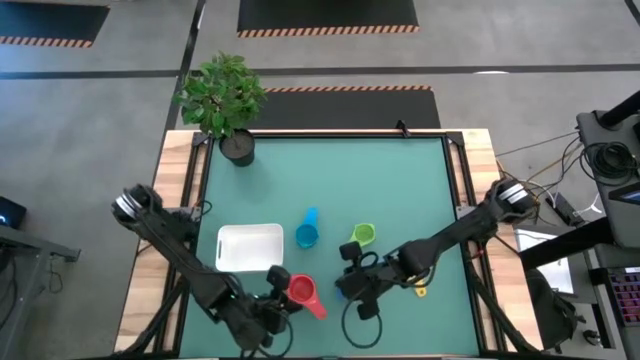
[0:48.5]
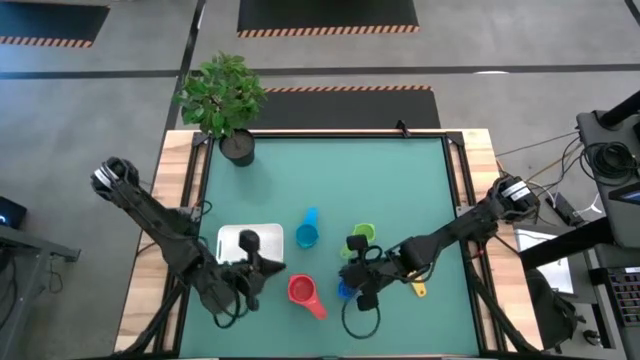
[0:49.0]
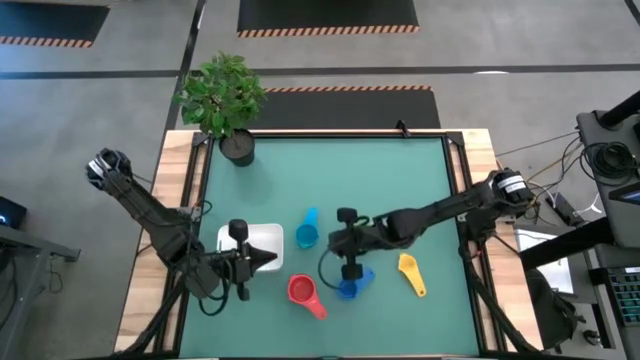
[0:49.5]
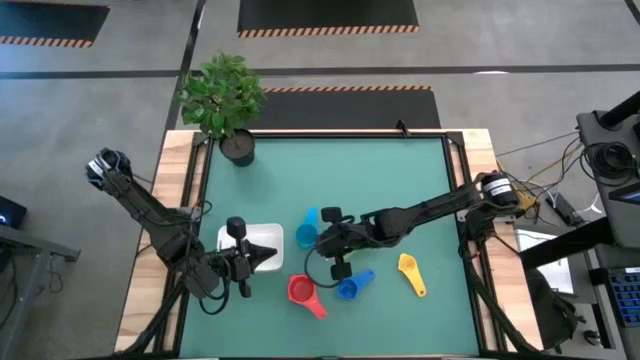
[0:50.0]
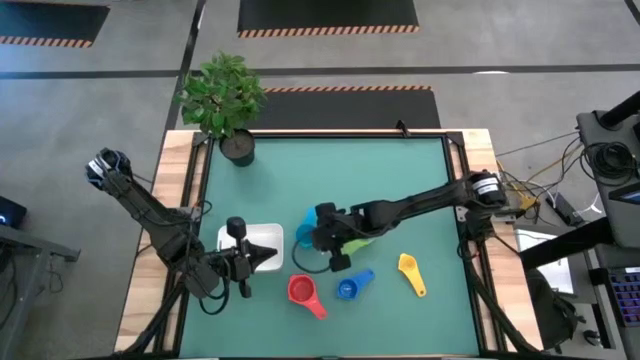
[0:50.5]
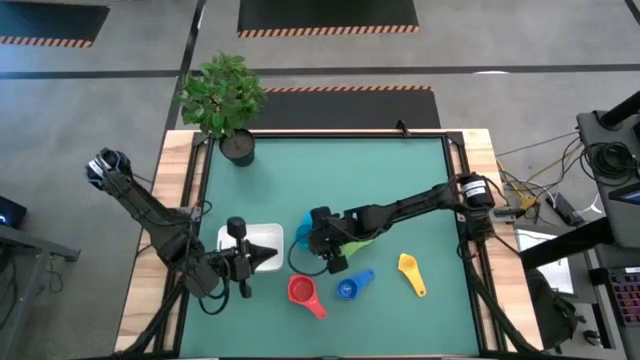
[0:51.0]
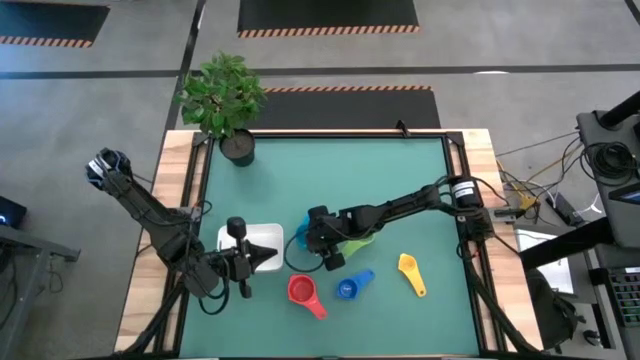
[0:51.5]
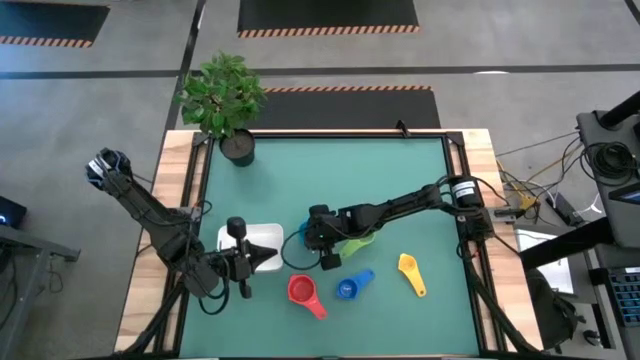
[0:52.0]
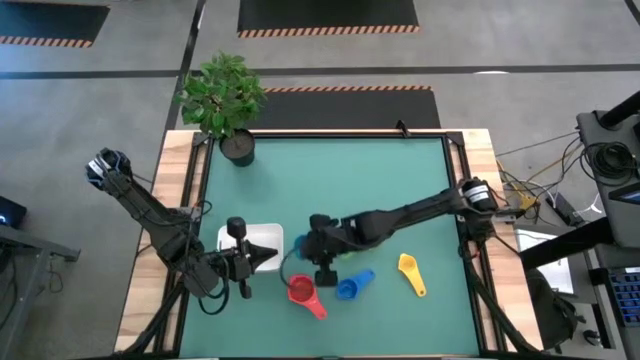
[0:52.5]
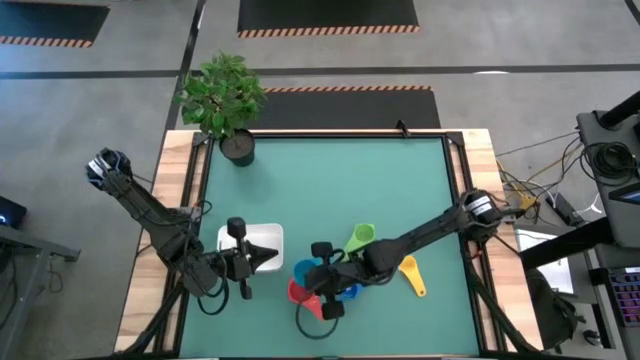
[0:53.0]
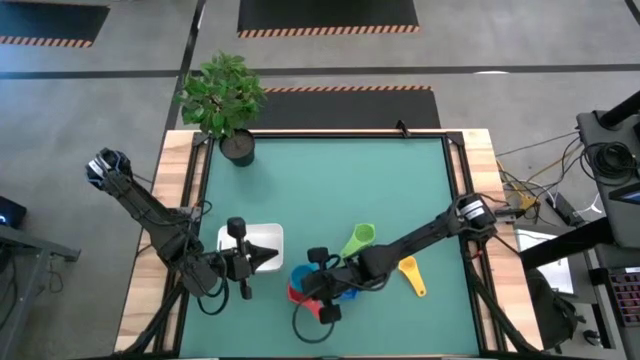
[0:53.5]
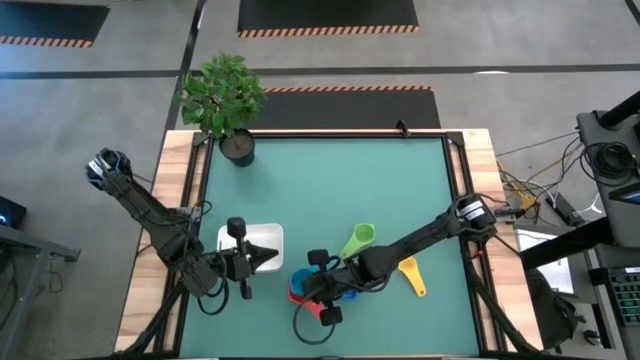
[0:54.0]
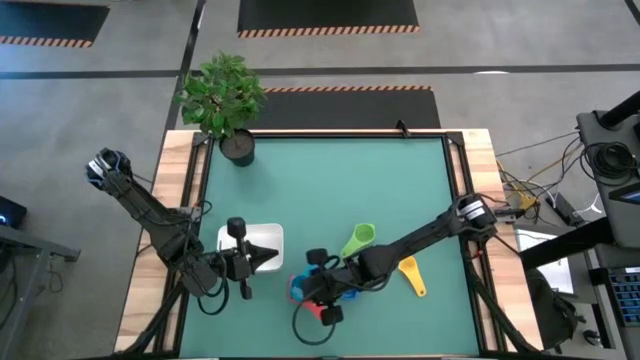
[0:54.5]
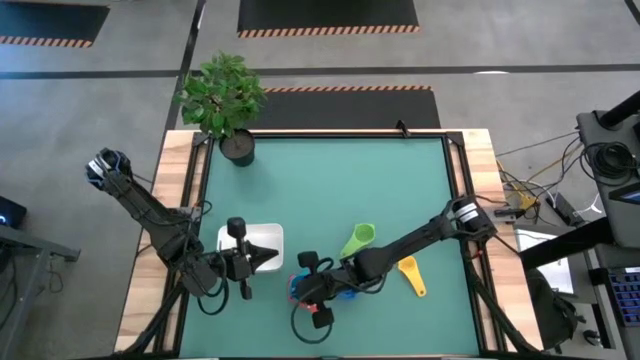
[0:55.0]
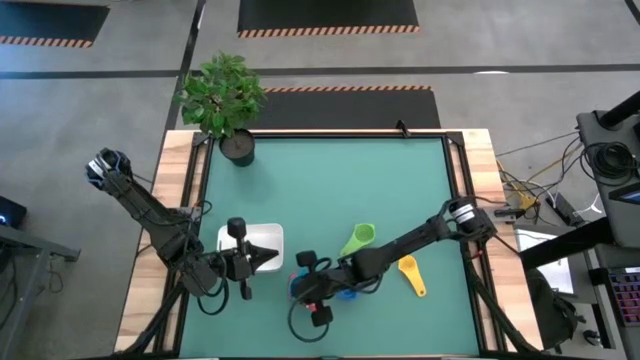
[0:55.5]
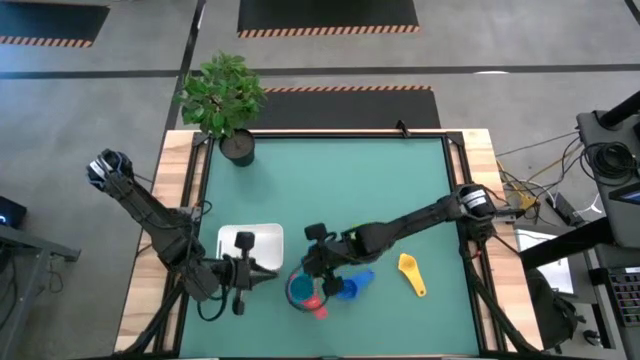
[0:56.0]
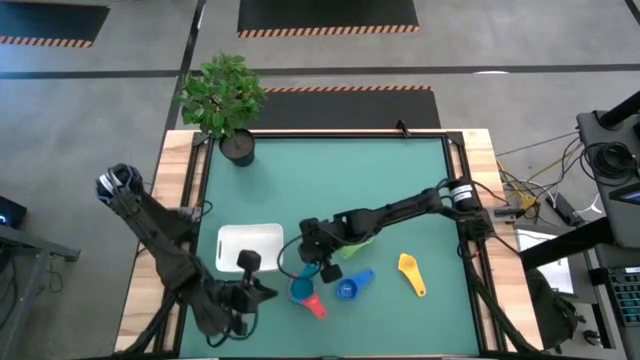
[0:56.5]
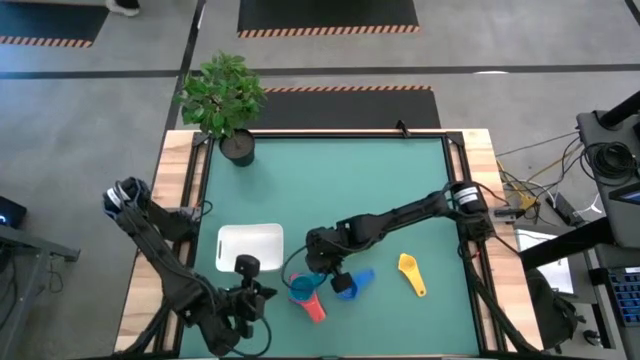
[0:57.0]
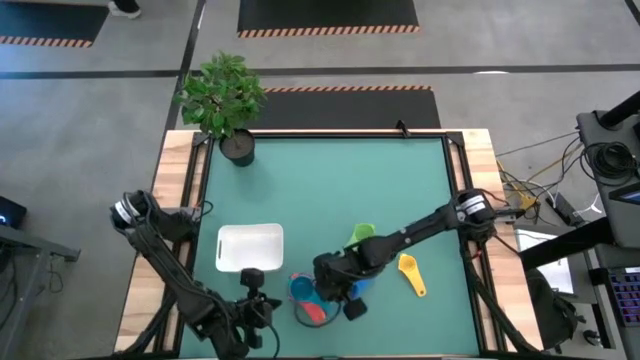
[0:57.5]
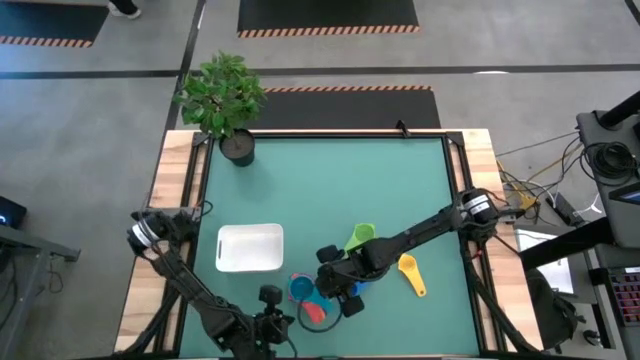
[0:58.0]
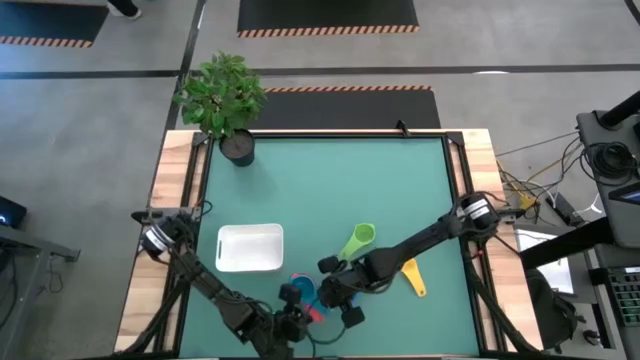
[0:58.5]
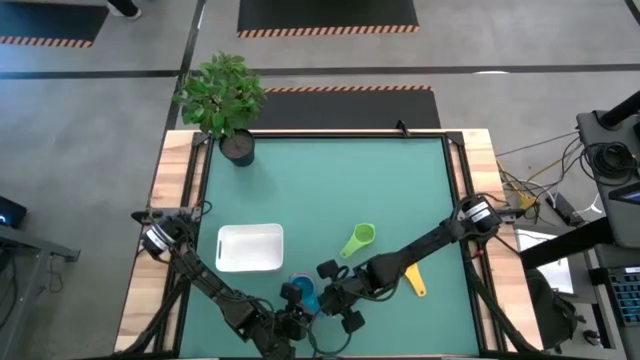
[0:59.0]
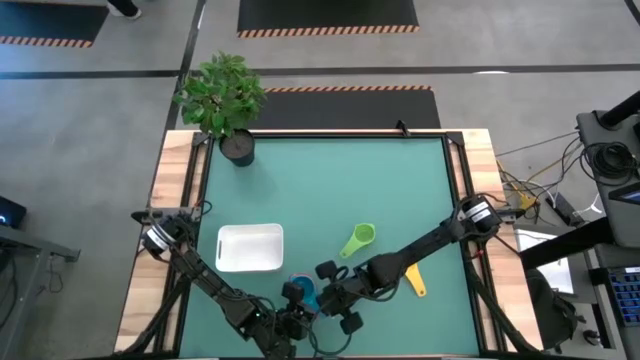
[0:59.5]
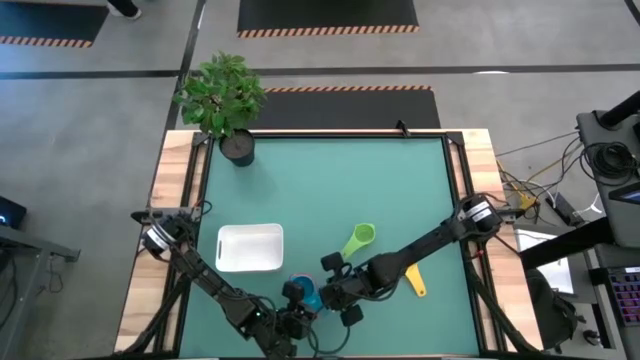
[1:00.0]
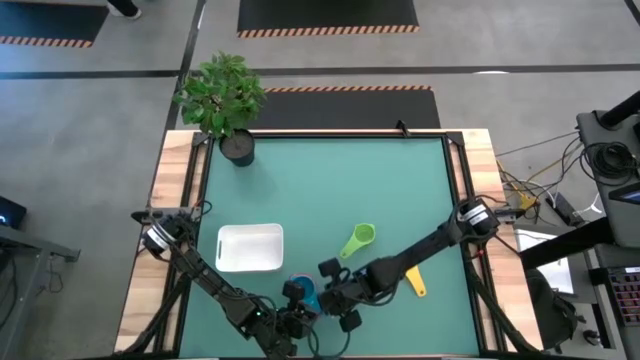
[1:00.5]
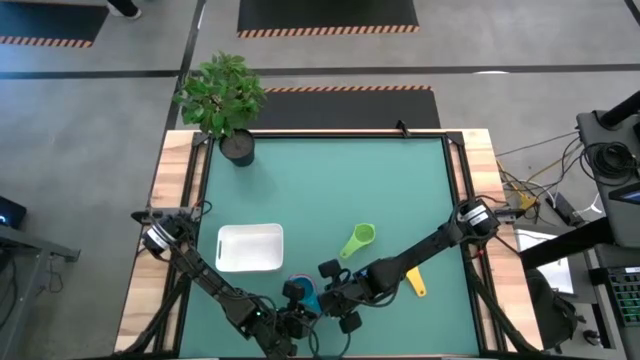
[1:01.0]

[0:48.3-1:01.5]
Task: Nest measuring cups in basket
Stack the blue measuring cup in the top of the purple measuring cup

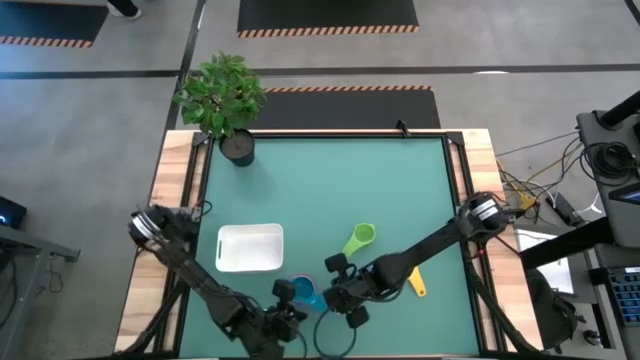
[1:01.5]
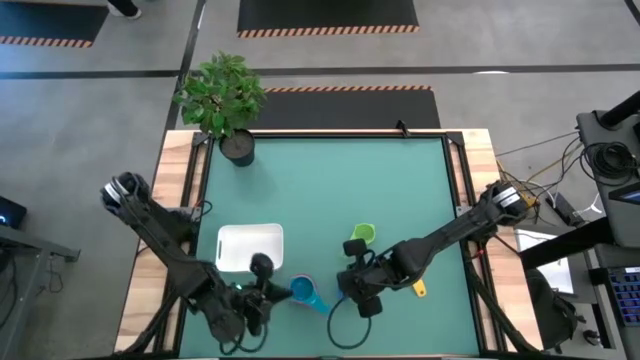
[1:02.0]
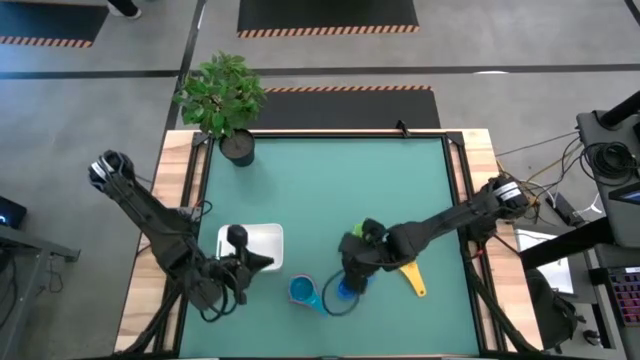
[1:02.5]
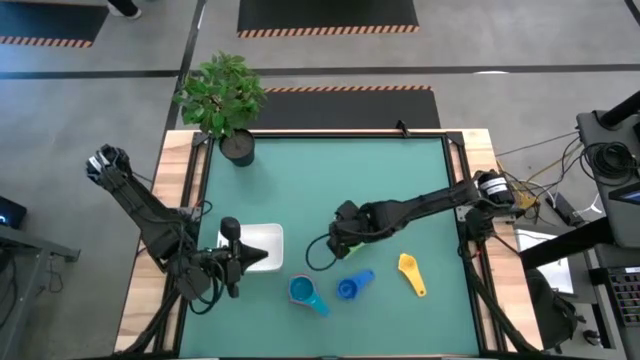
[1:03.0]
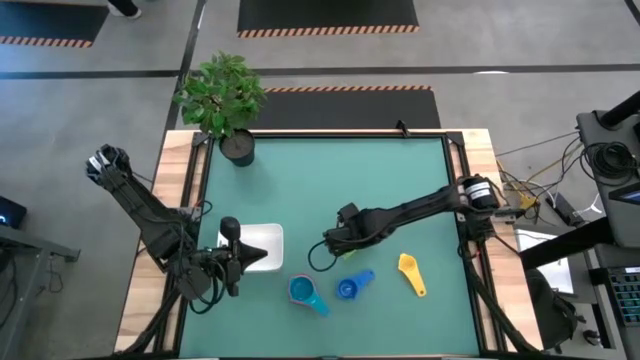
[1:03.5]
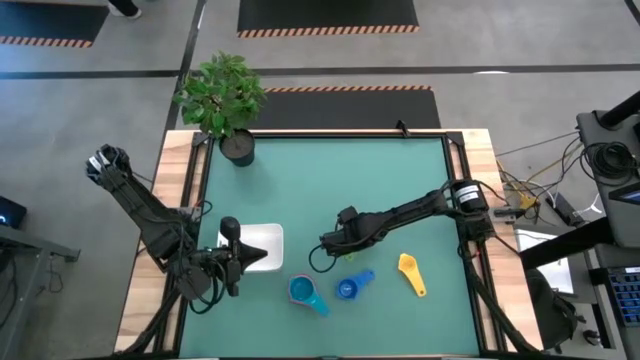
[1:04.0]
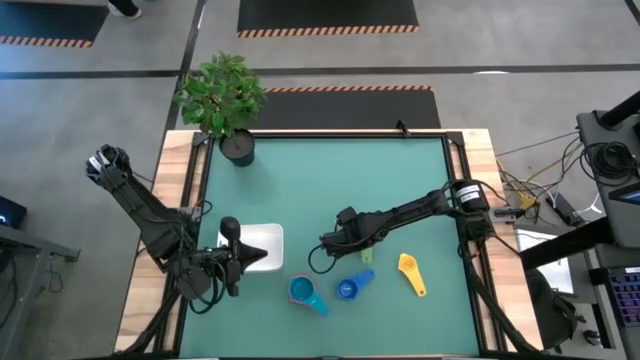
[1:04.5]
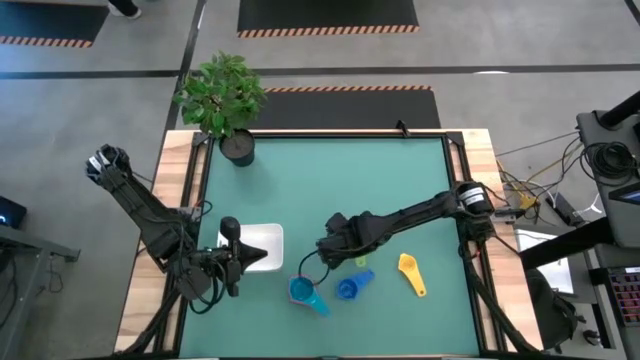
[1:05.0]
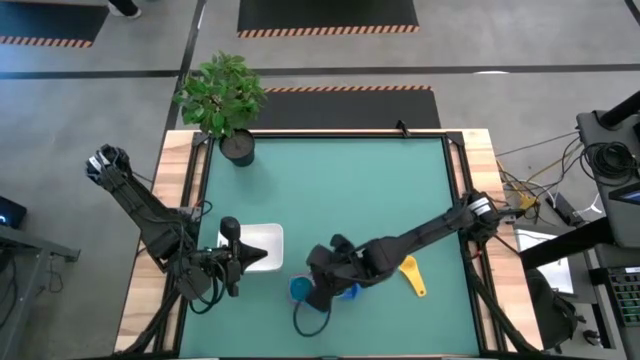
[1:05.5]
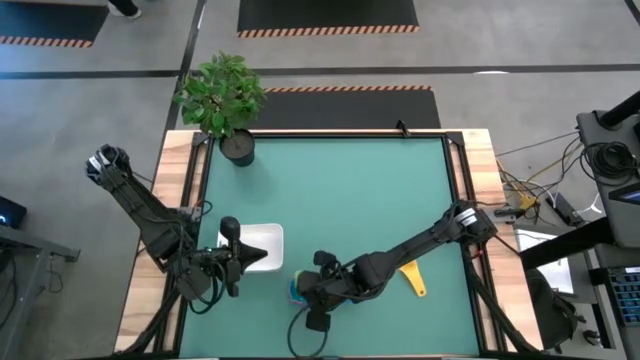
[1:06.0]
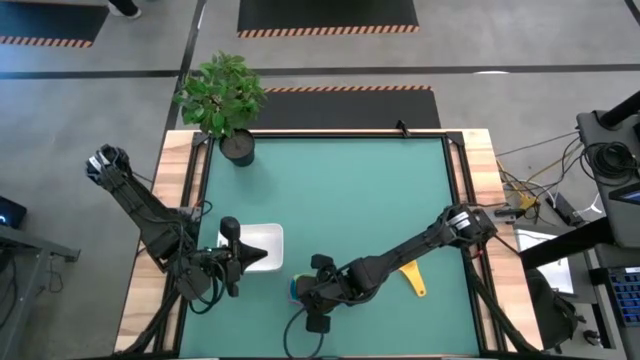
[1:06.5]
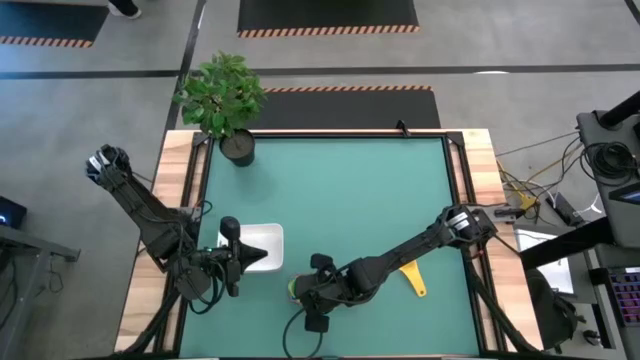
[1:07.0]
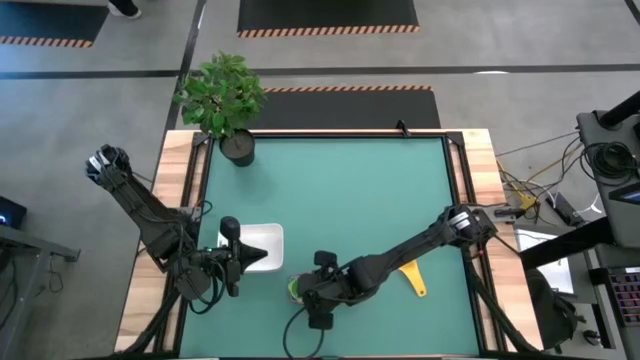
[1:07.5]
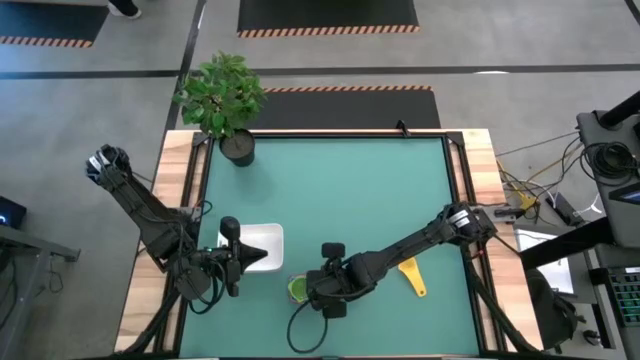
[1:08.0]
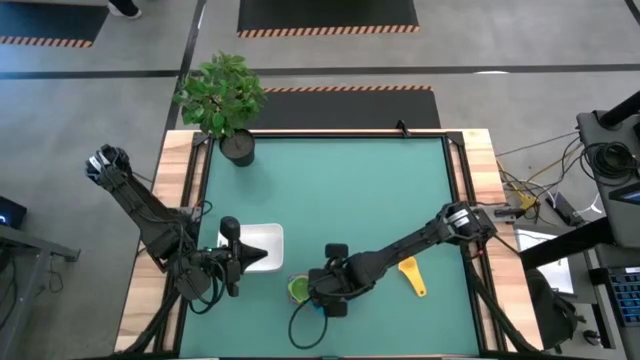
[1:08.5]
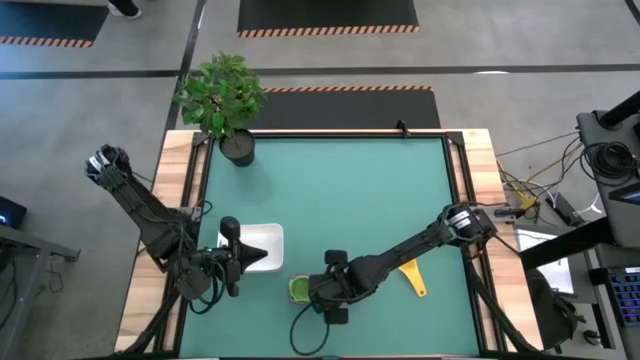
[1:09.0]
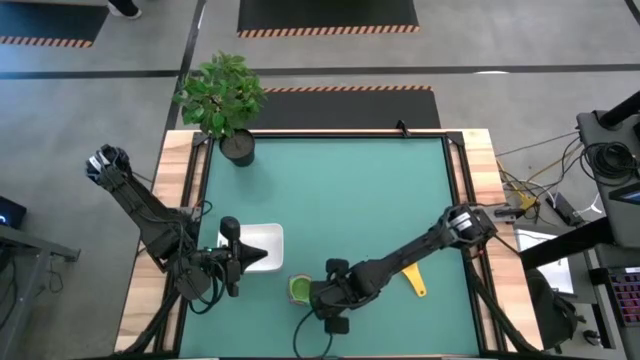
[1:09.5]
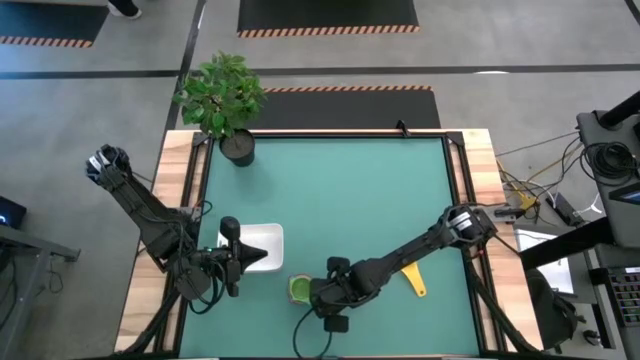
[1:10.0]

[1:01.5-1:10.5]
Stack the green measuring cup in the top of the purple measuring cup
